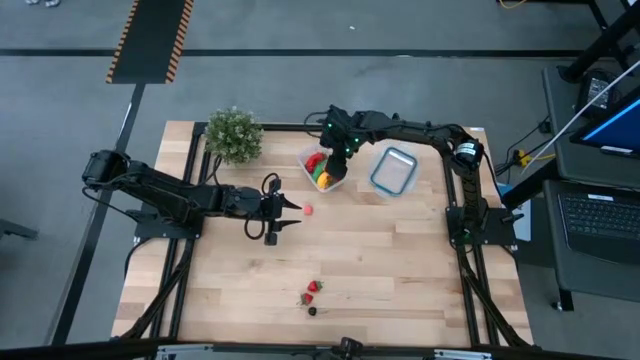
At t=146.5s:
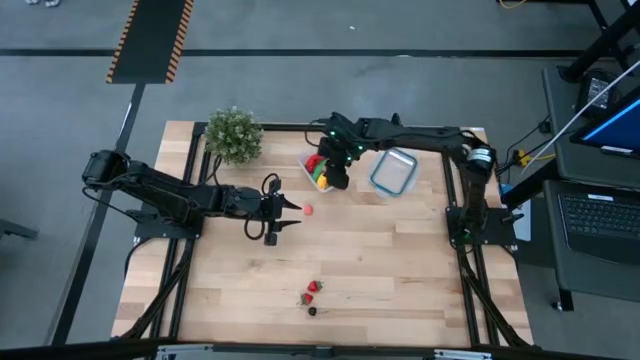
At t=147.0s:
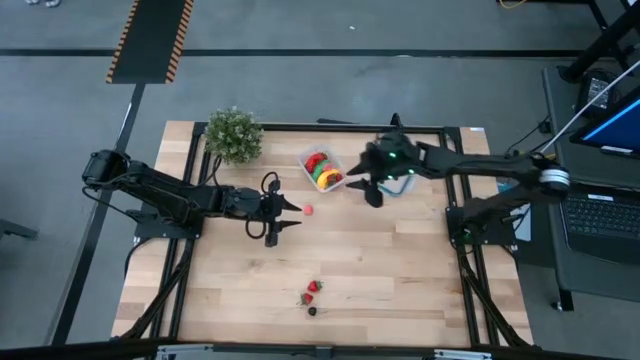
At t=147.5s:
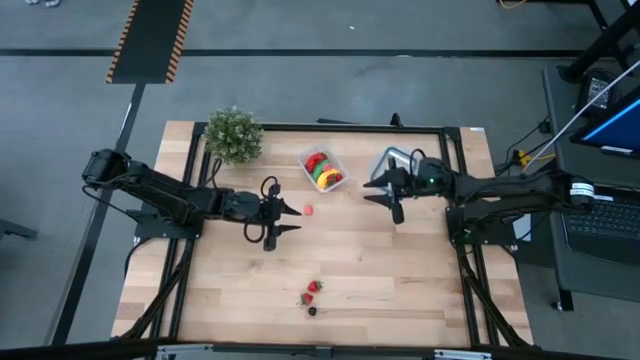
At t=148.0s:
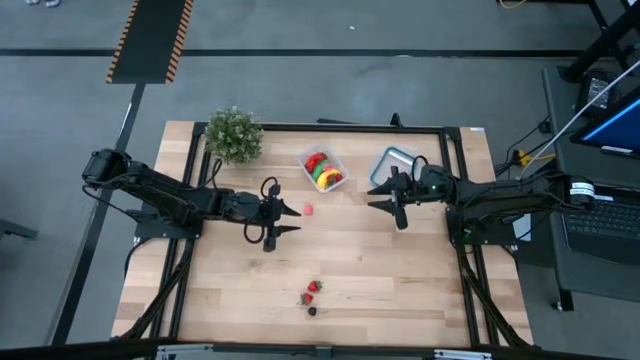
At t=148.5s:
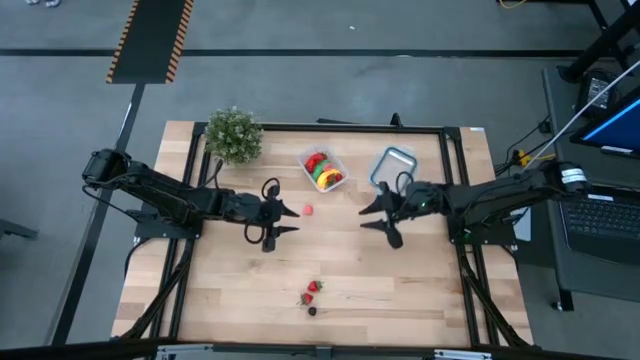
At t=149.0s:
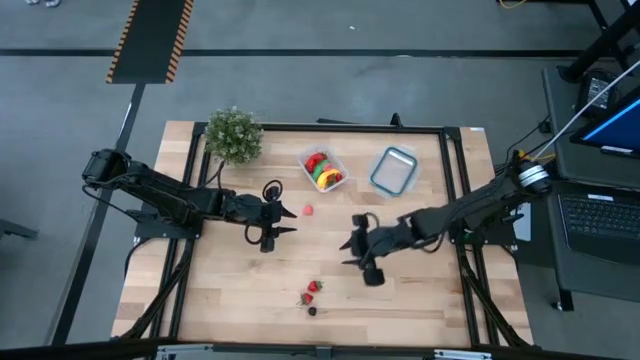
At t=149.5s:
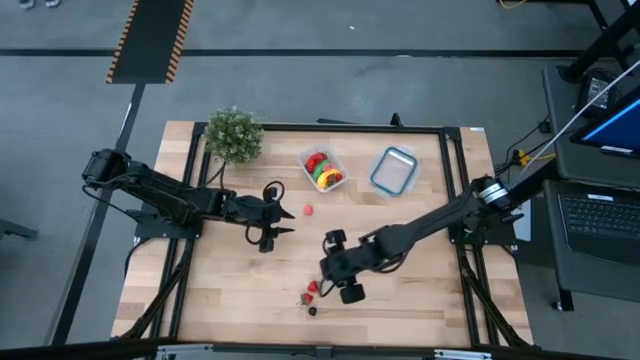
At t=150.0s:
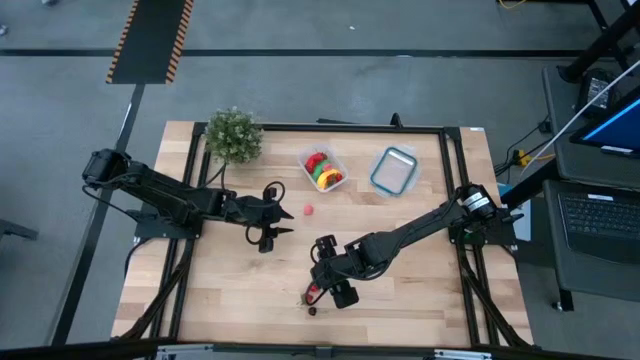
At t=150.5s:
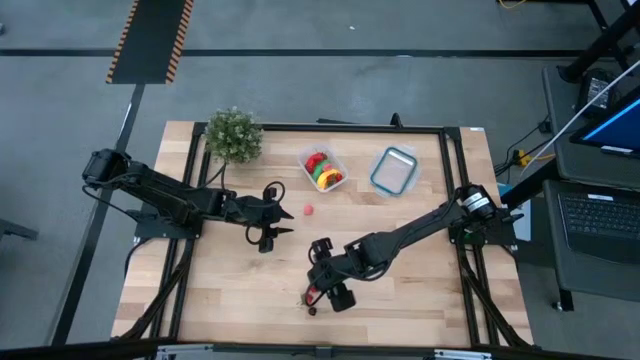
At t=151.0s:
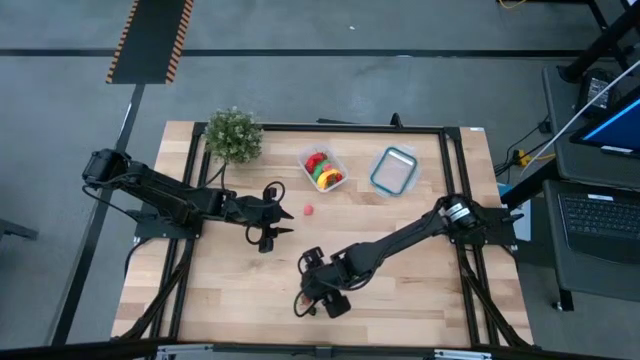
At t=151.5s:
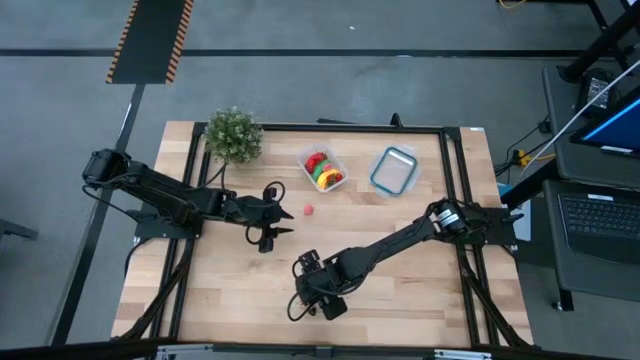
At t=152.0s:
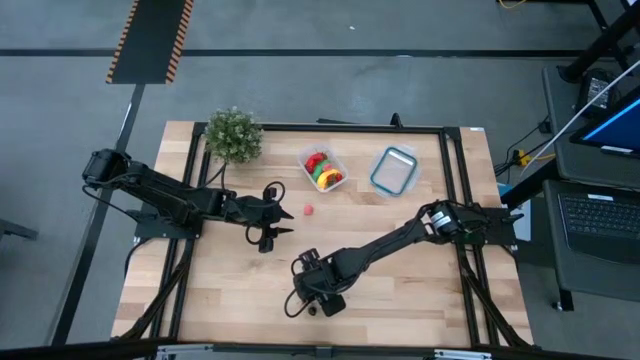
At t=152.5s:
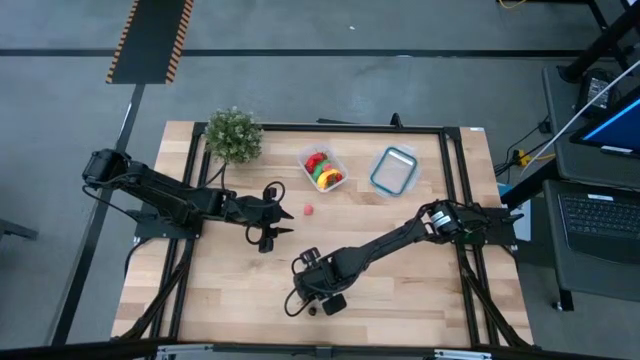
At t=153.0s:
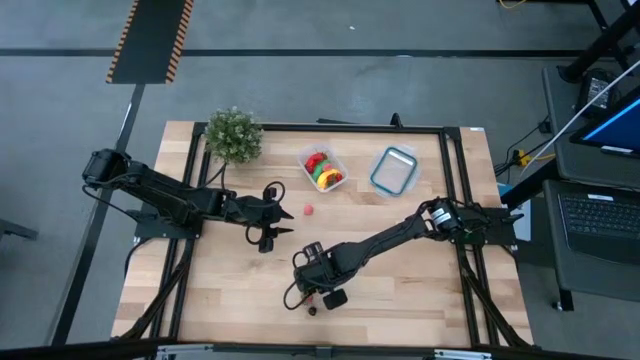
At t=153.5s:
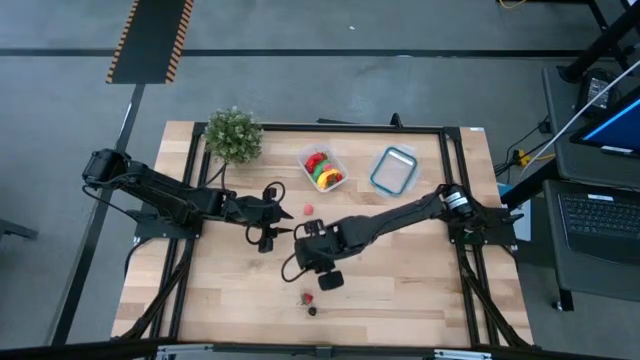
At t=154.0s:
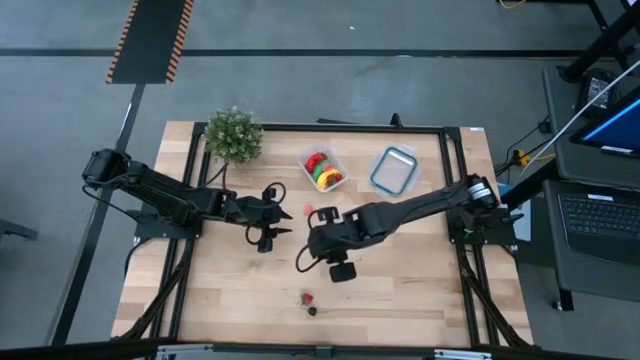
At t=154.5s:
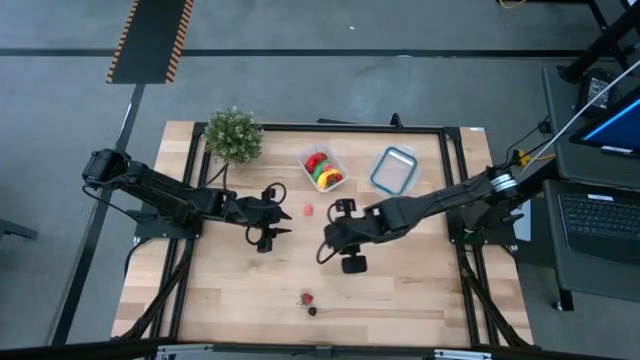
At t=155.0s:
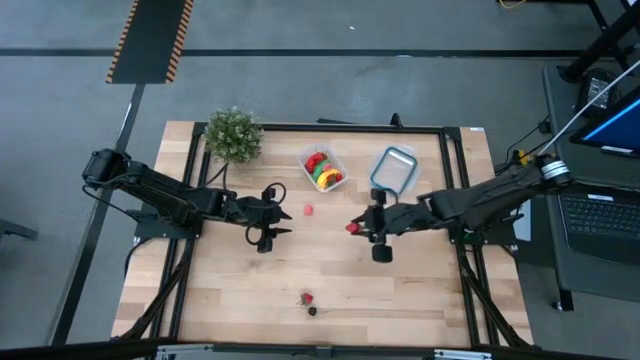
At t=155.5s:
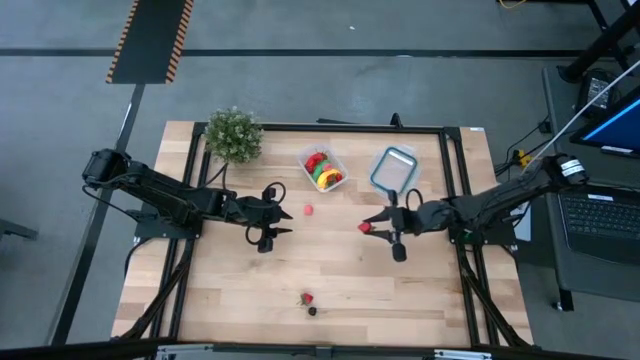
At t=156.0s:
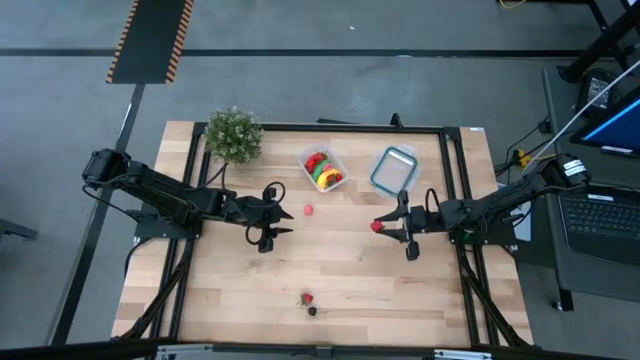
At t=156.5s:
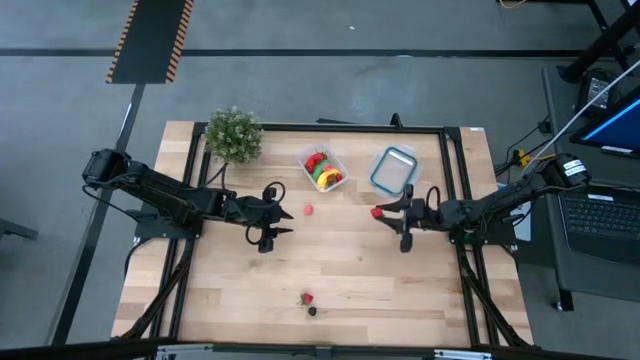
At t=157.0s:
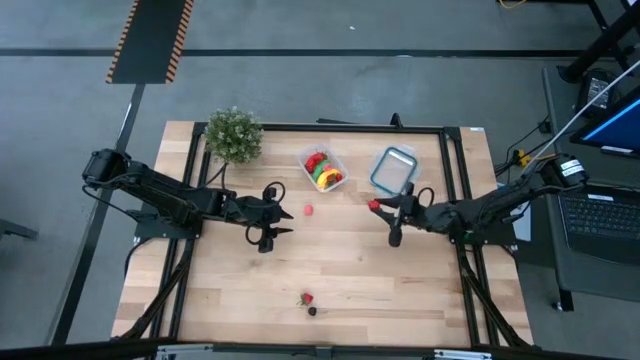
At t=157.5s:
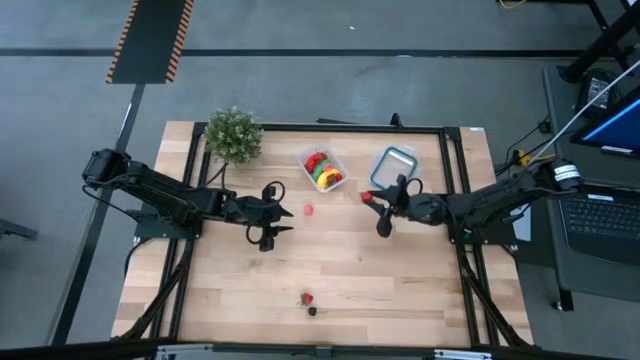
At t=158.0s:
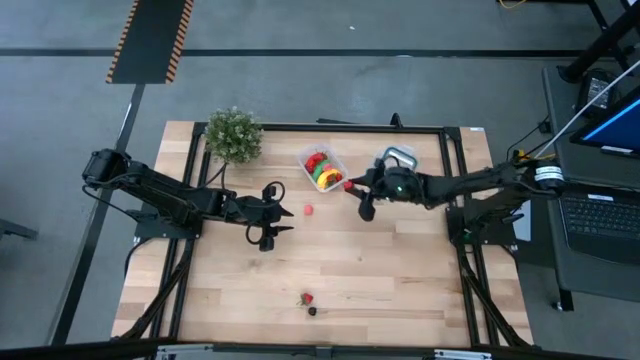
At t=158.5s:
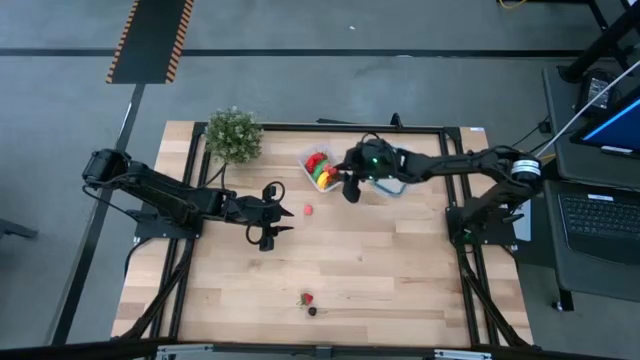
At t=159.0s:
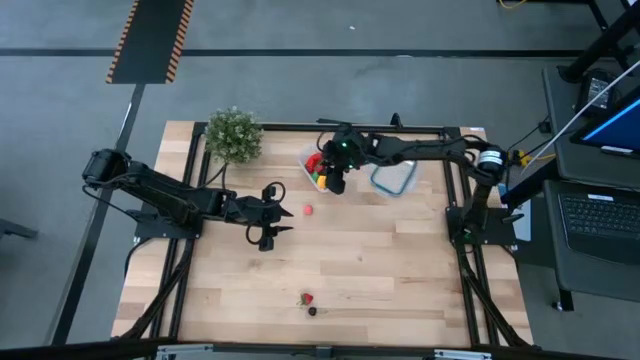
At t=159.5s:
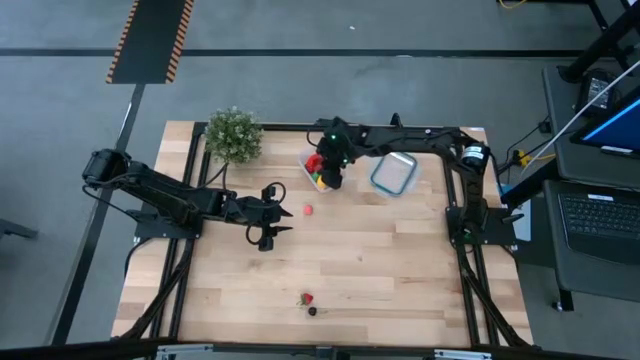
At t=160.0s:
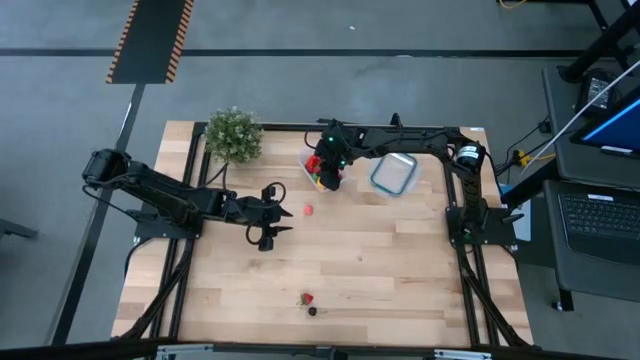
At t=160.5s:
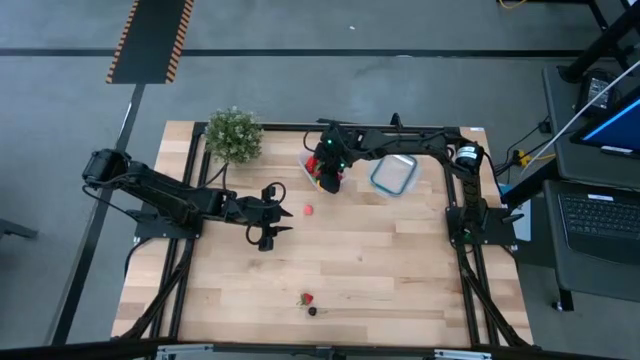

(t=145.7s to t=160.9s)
Task: Pick and placing Produce into tupperware
Put the top red strawberry into the transparent container

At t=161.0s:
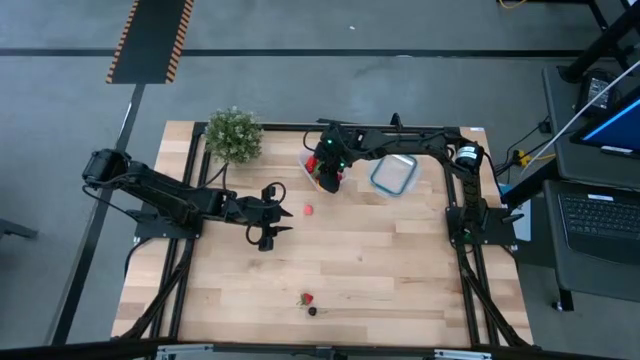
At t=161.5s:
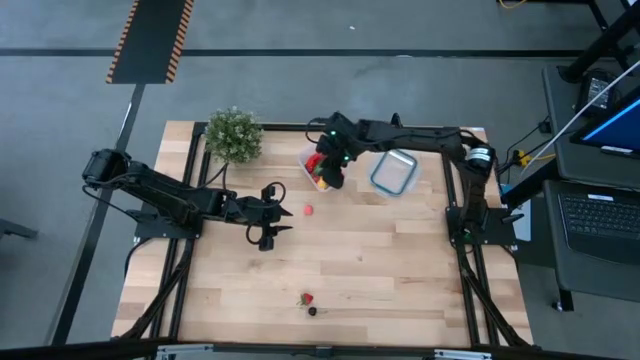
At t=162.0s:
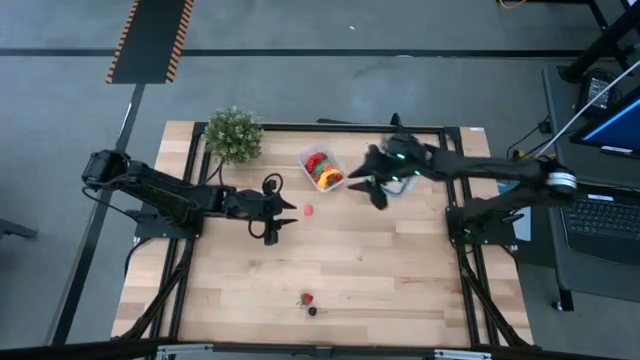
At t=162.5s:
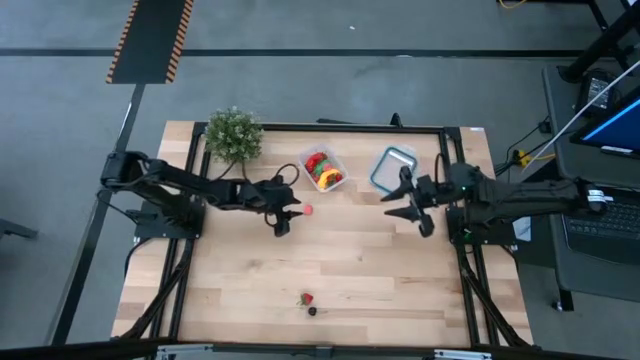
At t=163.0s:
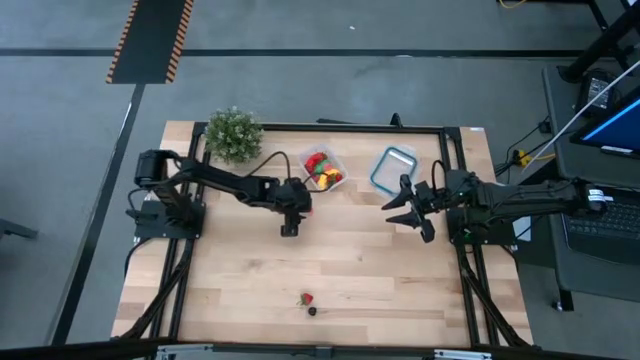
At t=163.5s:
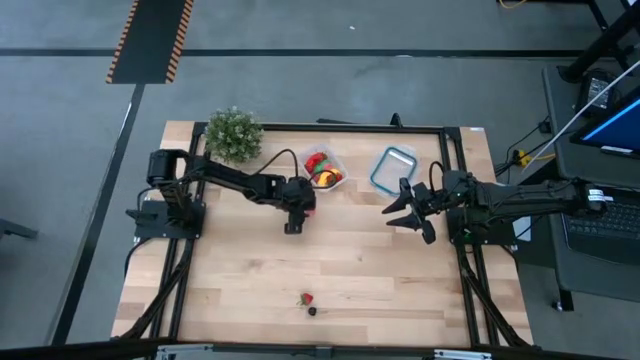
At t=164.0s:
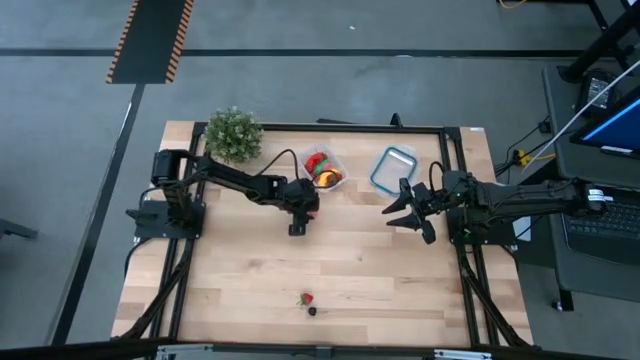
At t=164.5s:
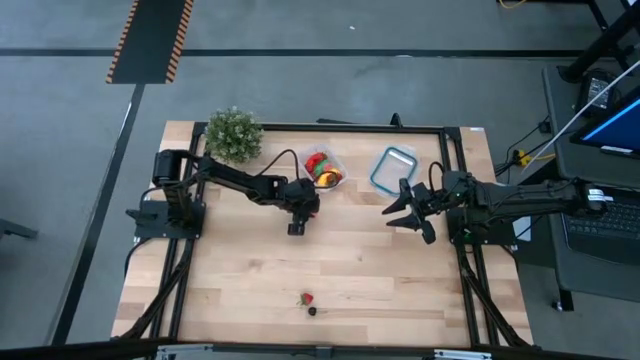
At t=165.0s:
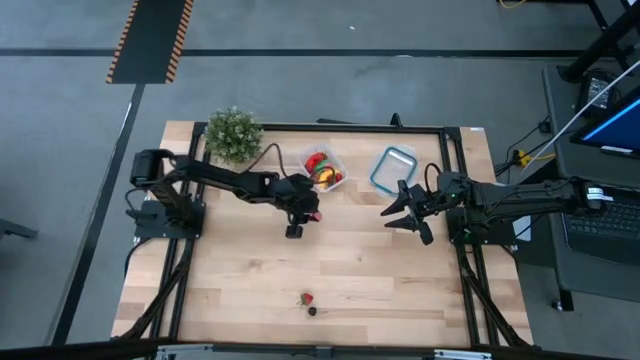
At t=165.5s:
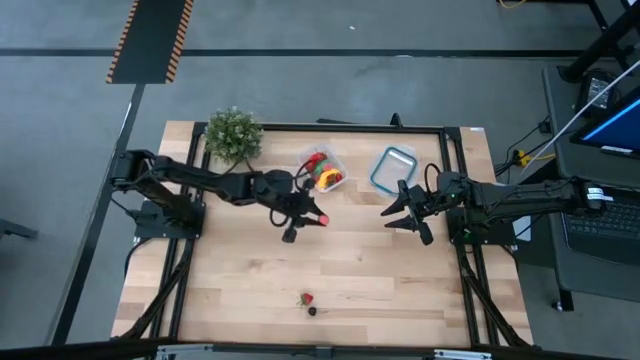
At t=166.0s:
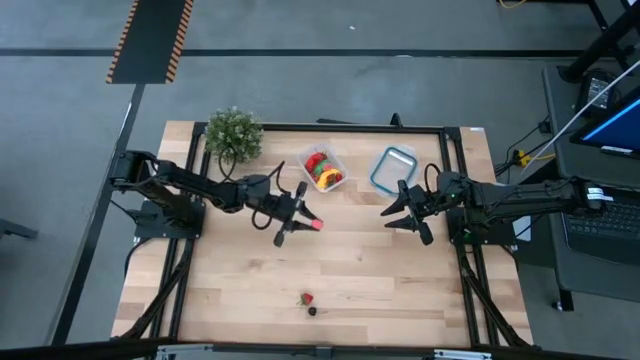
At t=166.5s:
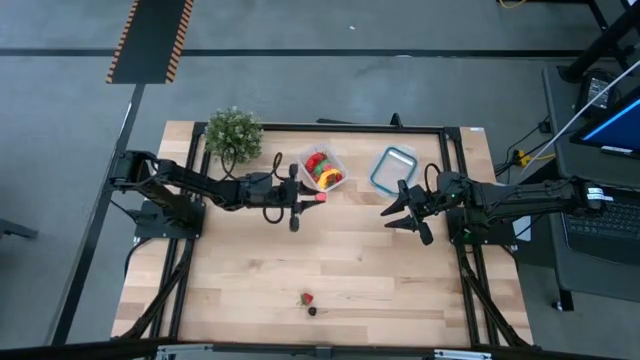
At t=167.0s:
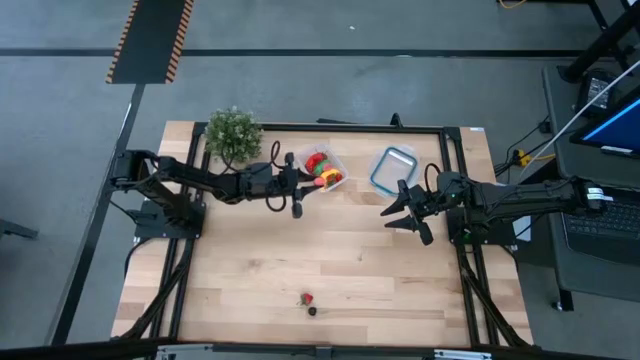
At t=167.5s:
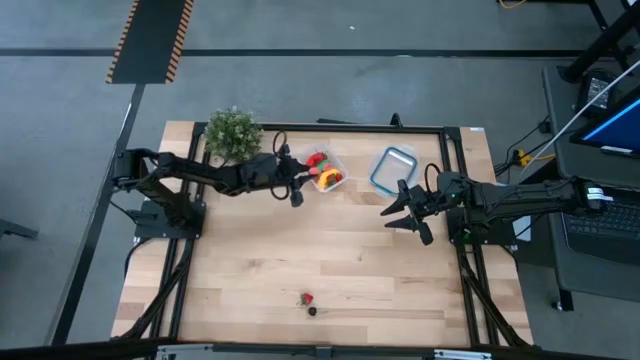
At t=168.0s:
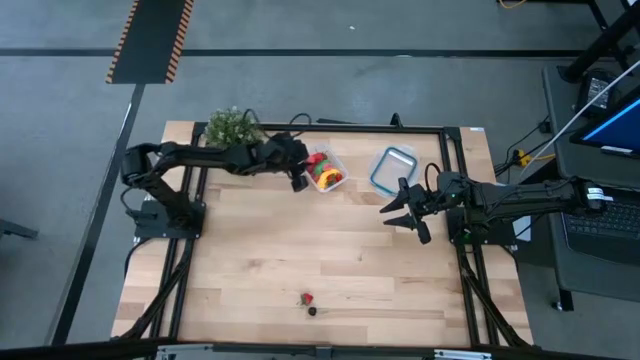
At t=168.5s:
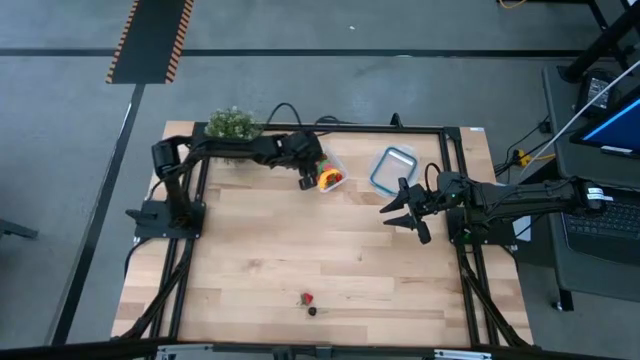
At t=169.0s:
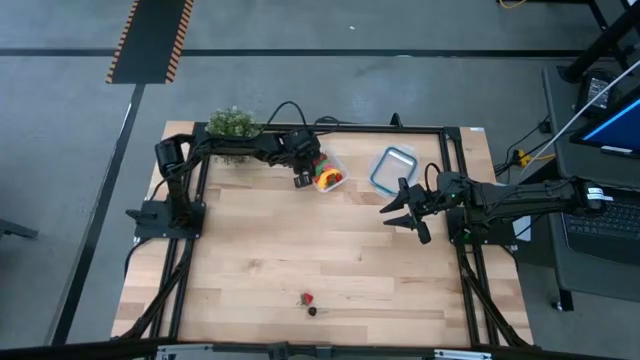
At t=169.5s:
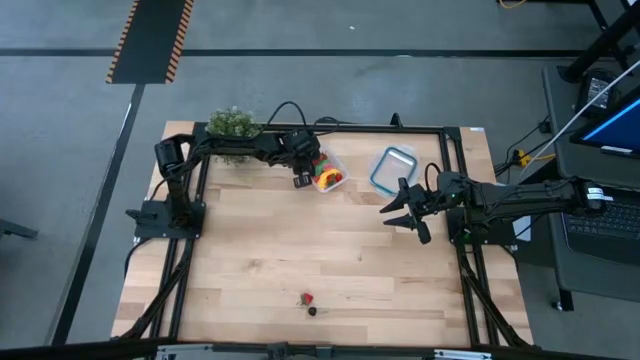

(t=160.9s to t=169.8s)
Put the pink apricot into the transparent container
